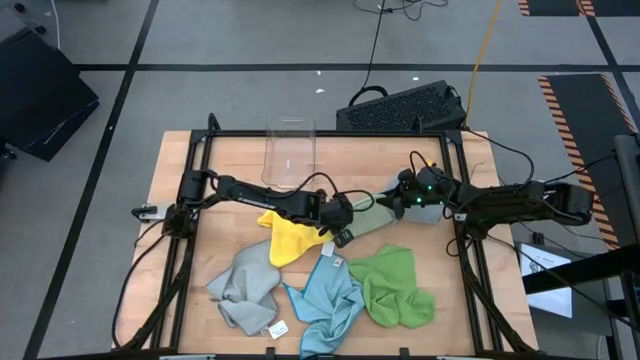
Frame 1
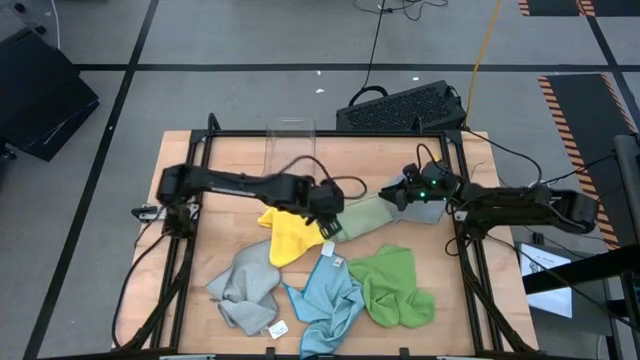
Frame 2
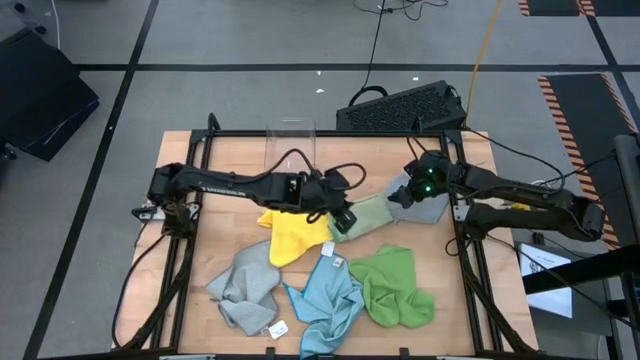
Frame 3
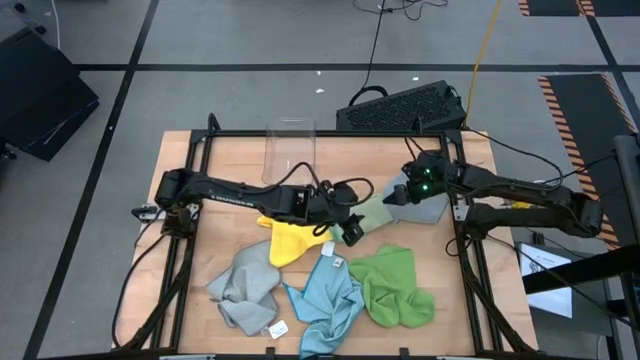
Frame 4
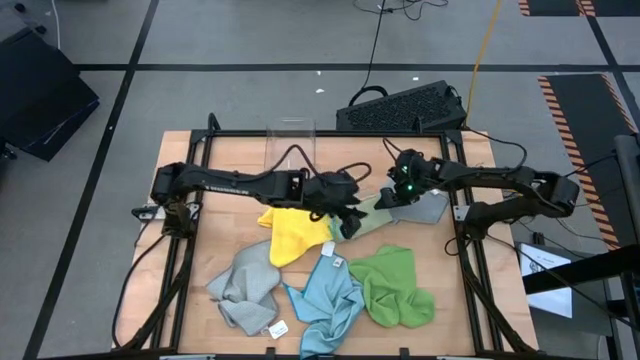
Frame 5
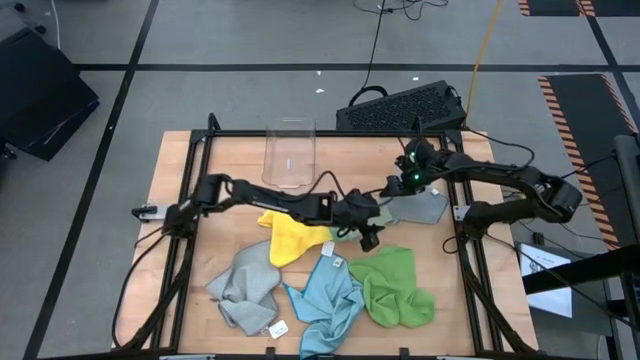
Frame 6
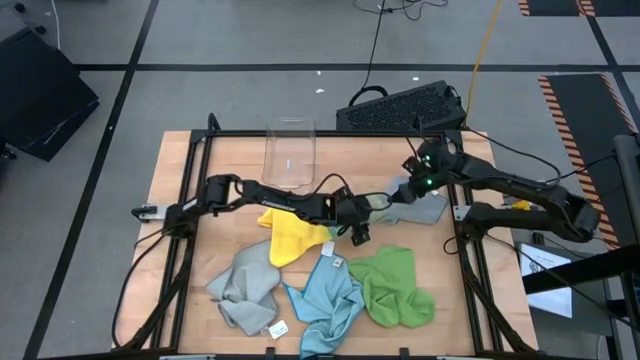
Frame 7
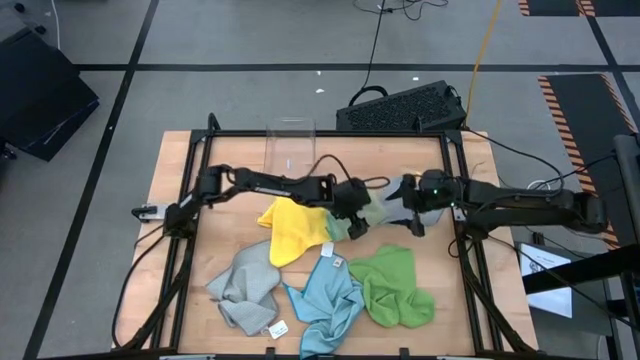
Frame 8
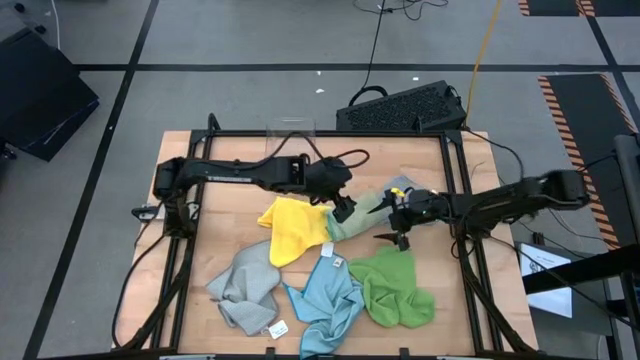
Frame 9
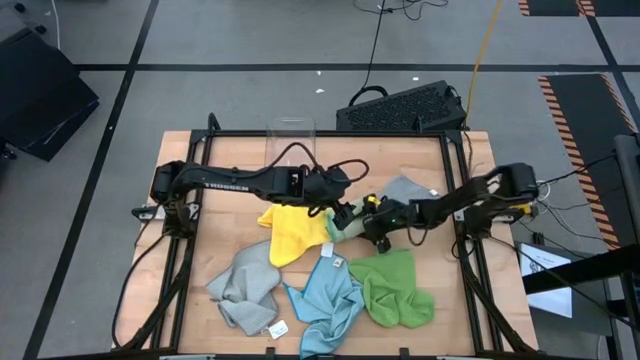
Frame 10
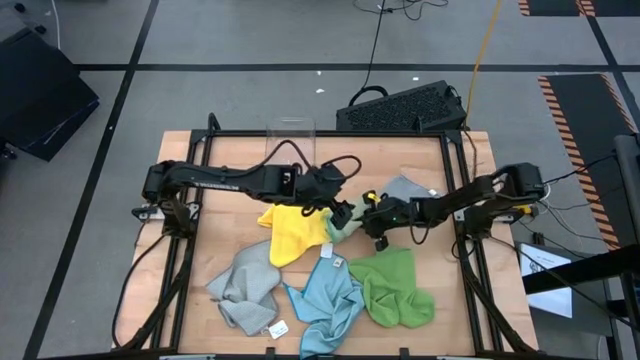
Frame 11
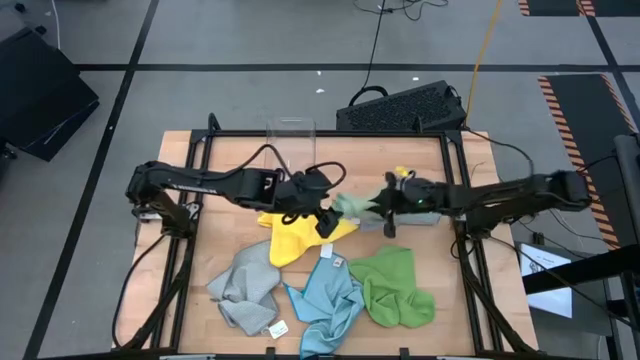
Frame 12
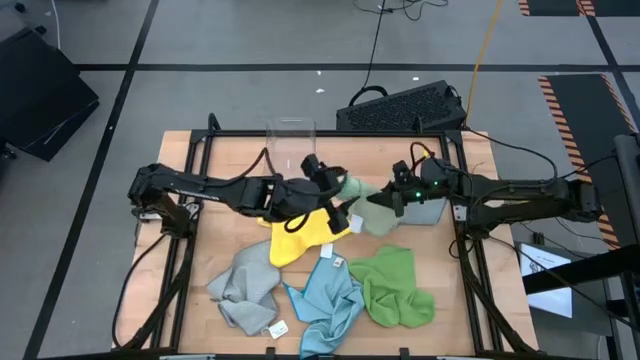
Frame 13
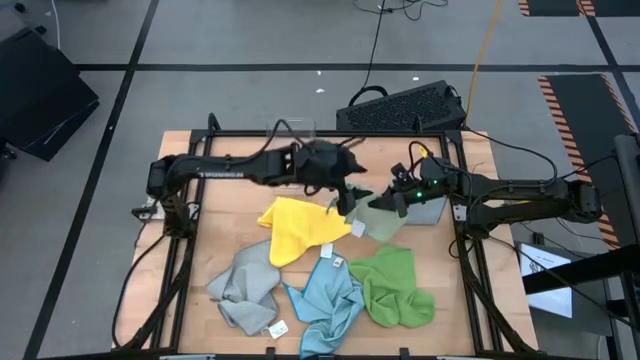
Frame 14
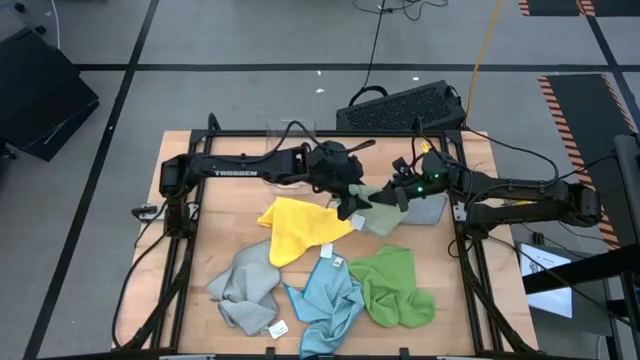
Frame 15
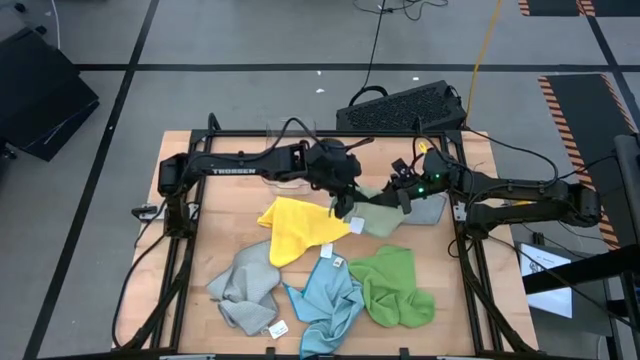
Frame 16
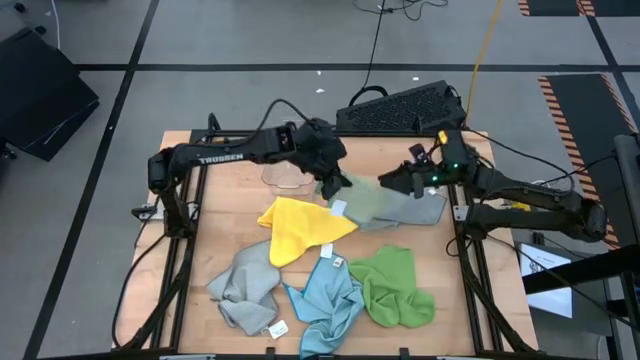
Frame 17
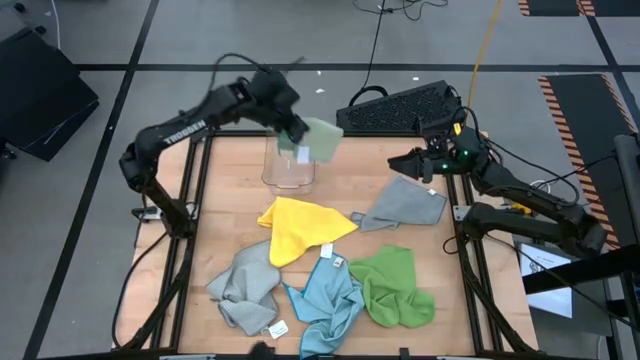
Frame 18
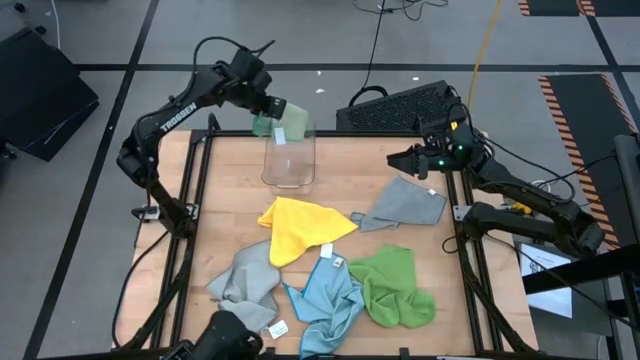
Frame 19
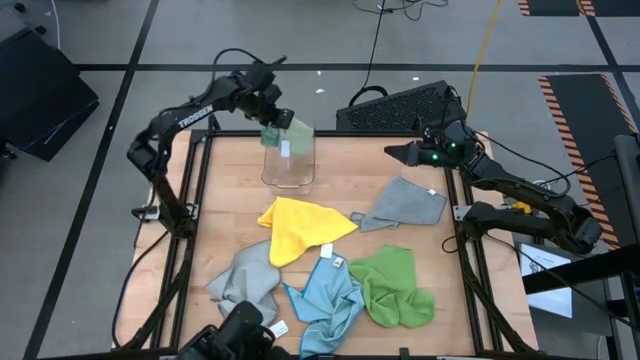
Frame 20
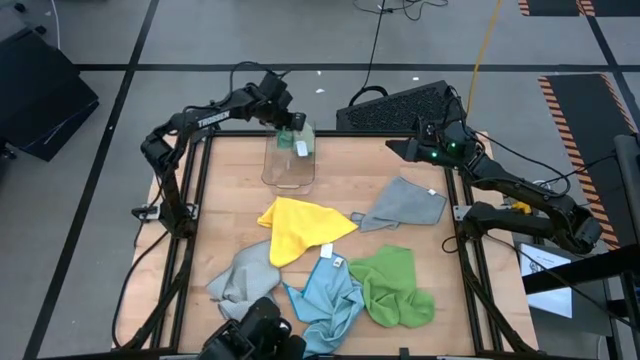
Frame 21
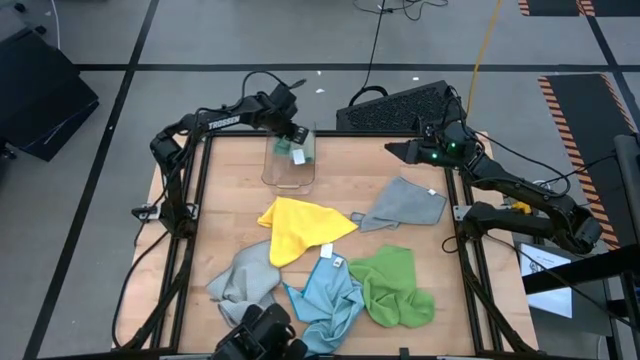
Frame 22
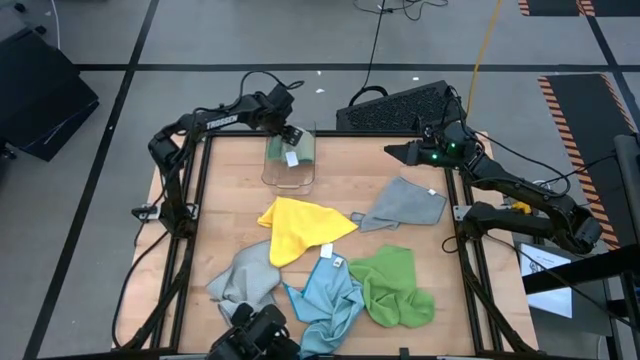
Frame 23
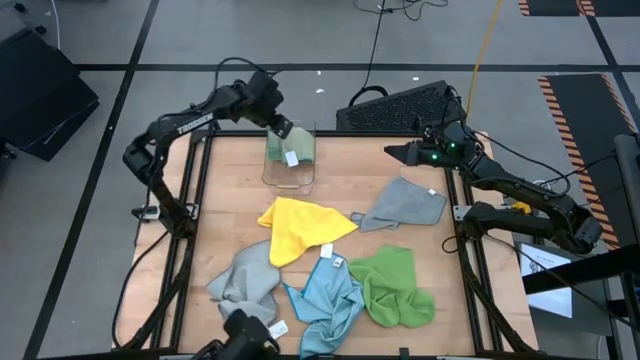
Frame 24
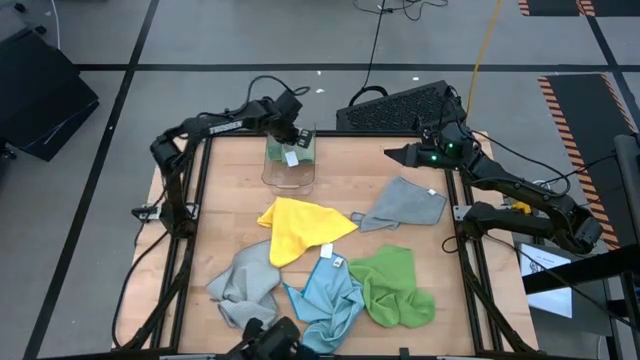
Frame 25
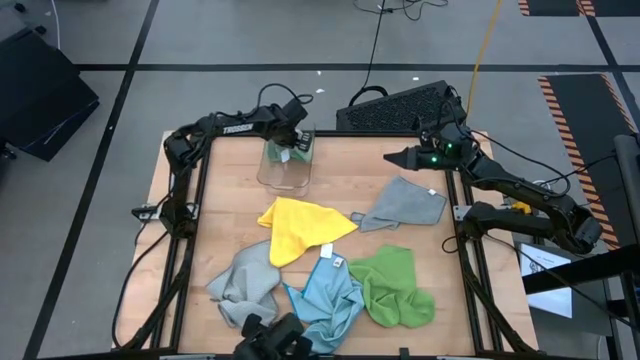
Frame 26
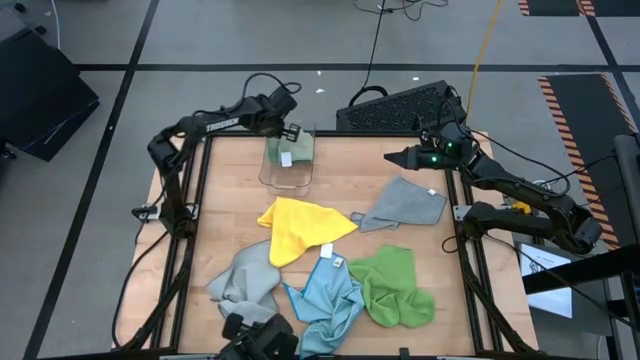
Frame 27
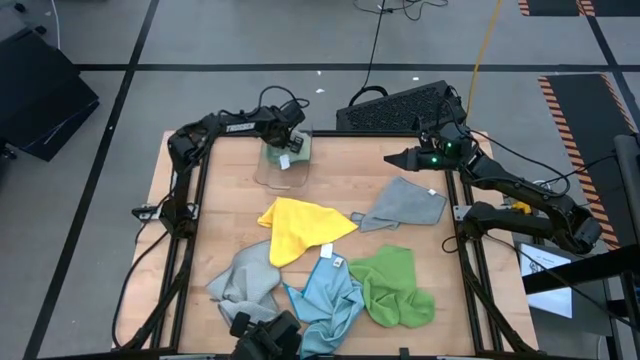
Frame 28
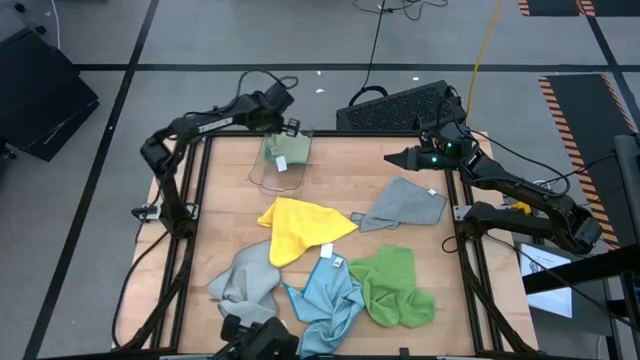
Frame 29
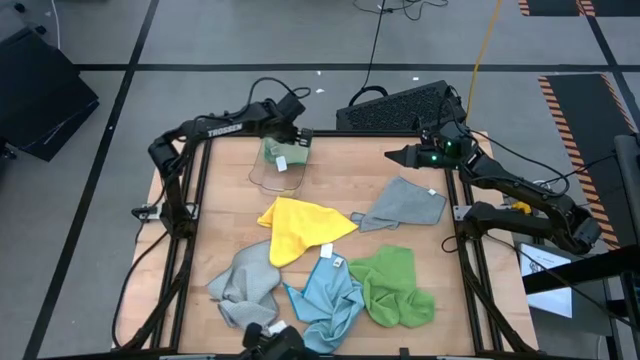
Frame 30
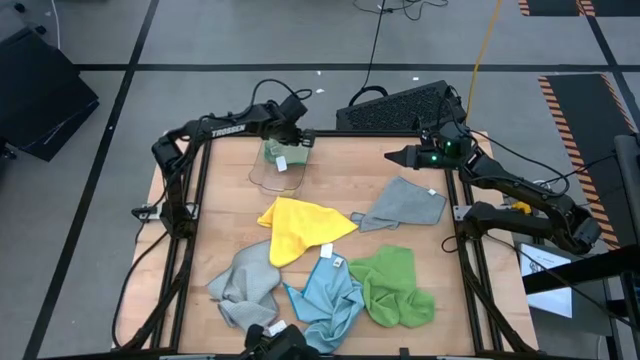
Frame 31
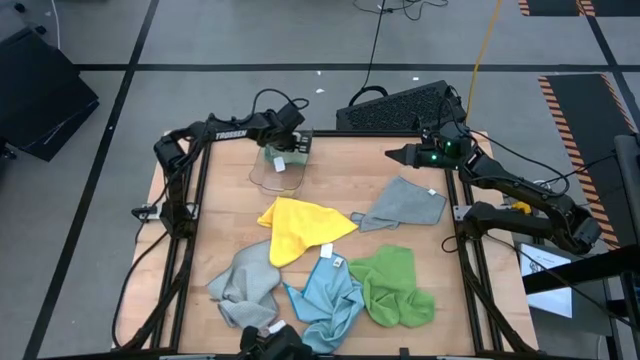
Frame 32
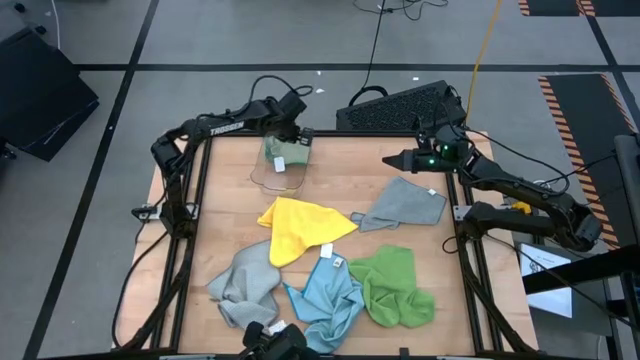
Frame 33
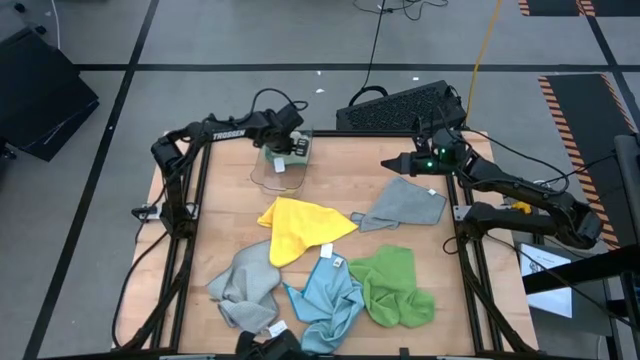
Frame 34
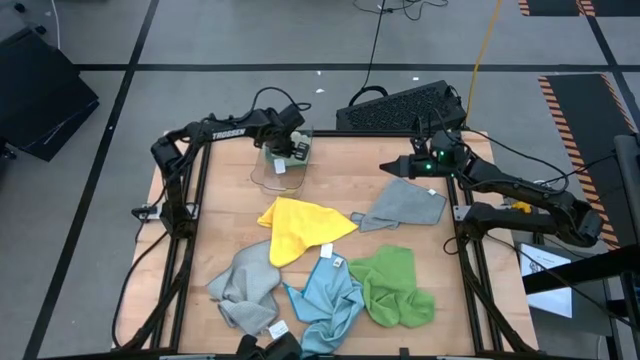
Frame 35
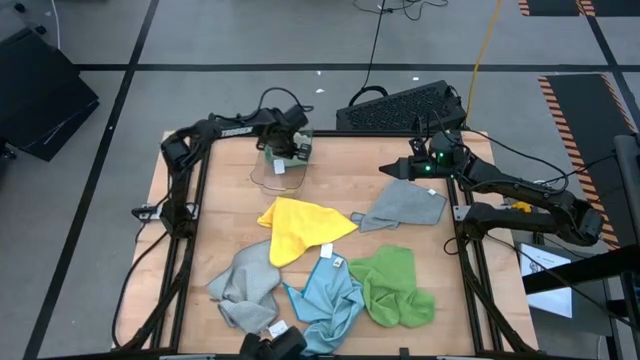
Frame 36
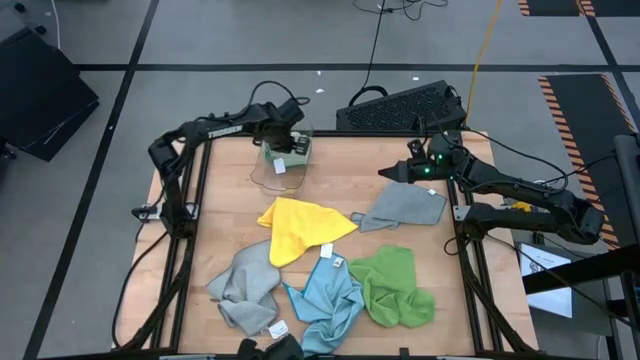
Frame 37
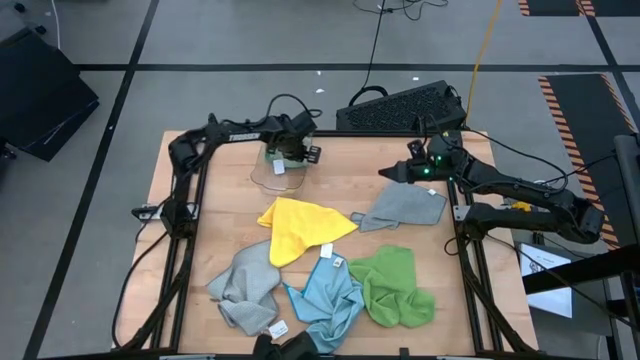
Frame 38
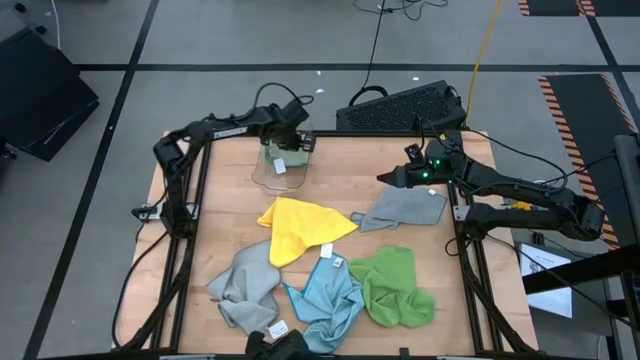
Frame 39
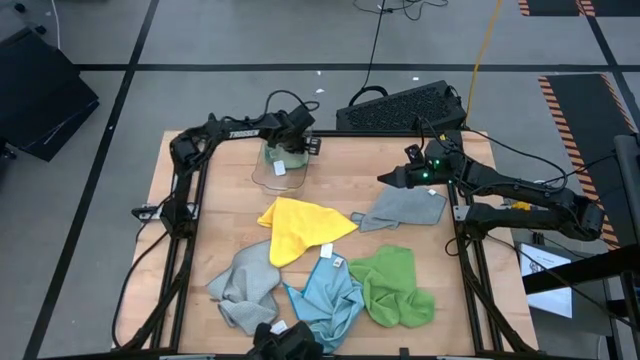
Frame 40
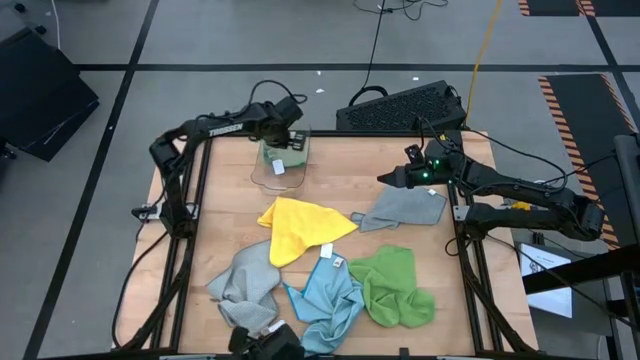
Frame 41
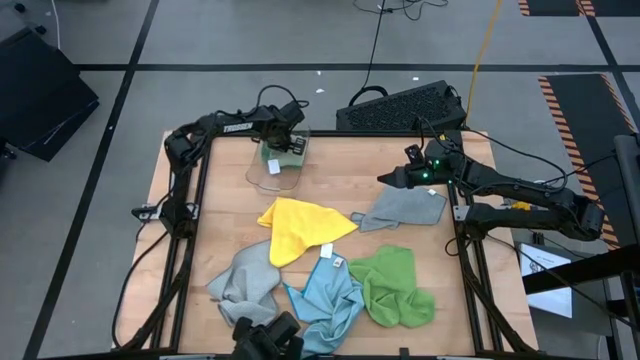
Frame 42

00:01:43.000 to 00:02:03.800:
Task: Fold microfiber towels
Put the light green microfiber cloth into the transparent bin

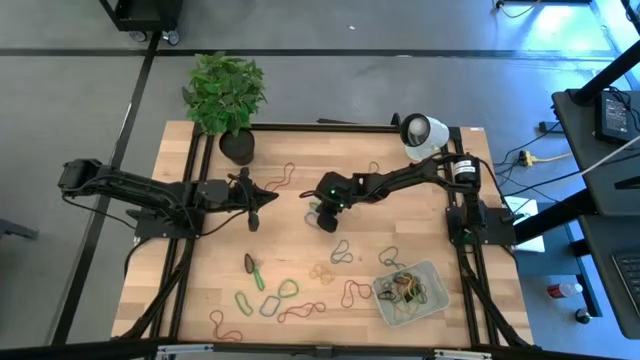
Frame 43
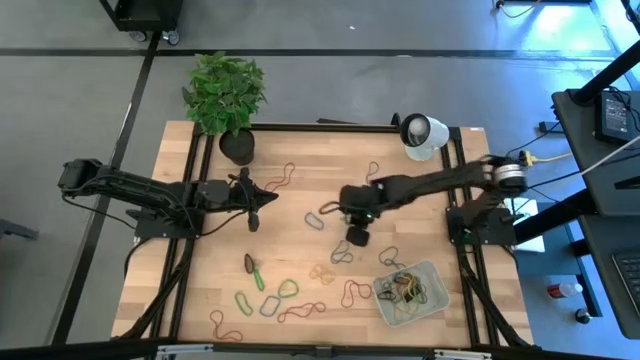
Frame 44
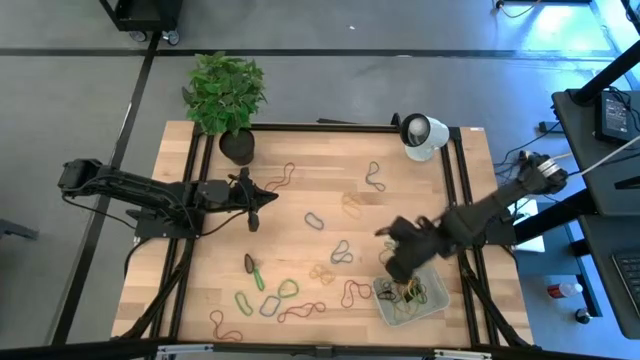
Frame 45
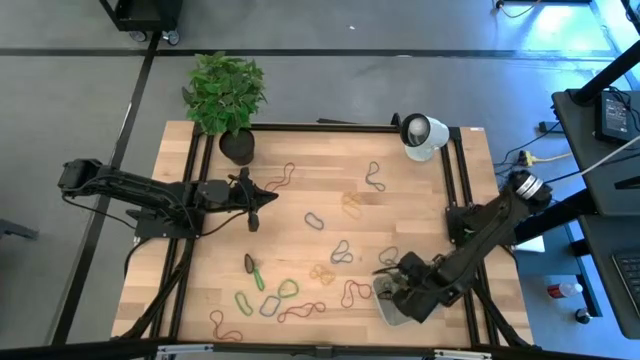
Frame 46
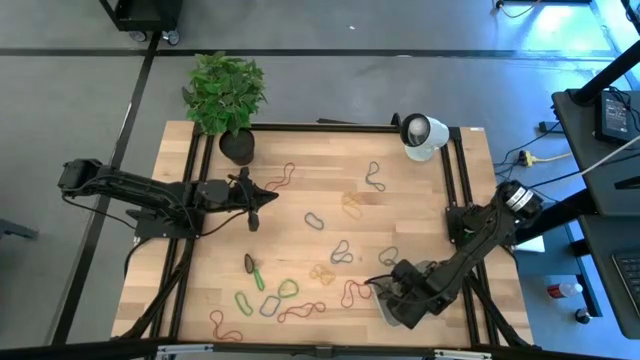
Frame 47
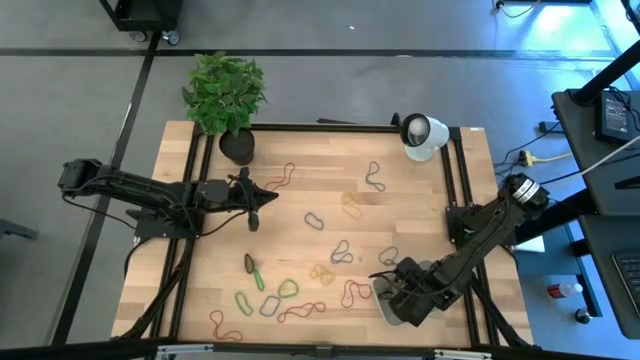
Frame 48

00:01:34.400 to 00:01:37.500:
Task: Pick and place rubber bands into bin
Put the green rubber band into the white bin
